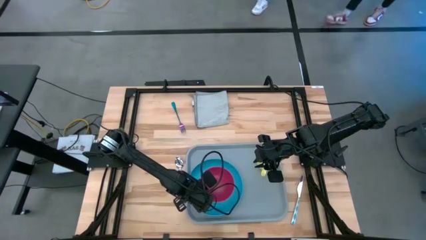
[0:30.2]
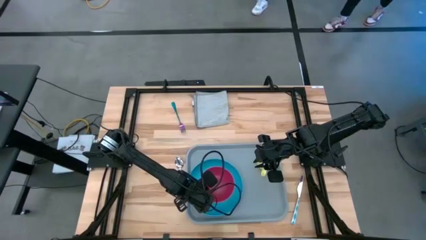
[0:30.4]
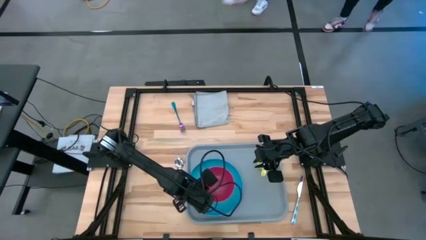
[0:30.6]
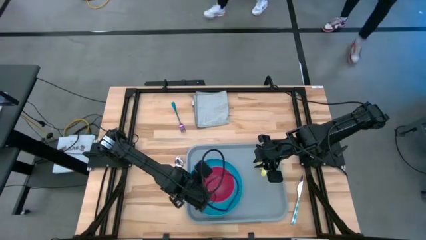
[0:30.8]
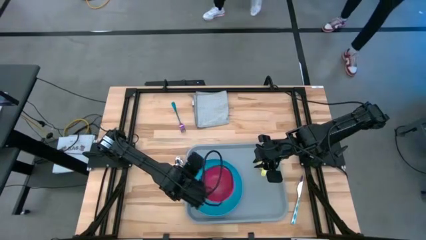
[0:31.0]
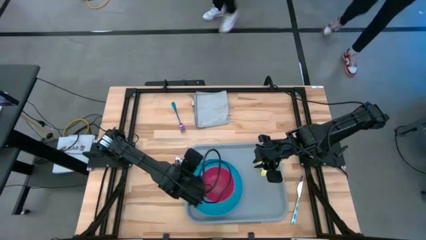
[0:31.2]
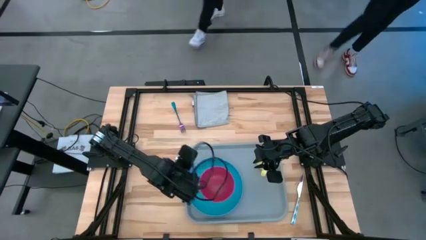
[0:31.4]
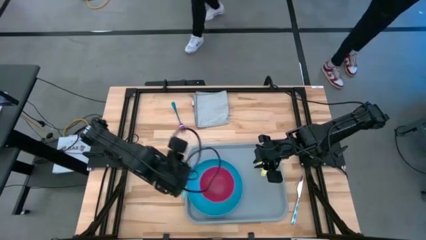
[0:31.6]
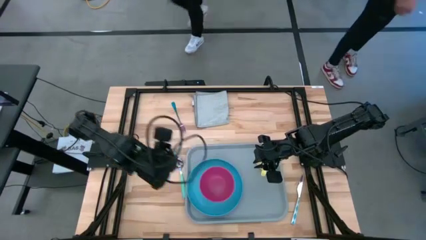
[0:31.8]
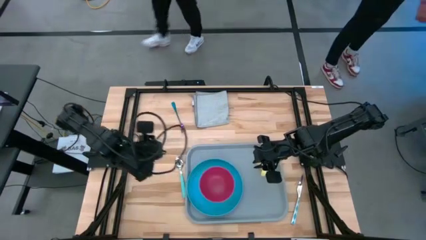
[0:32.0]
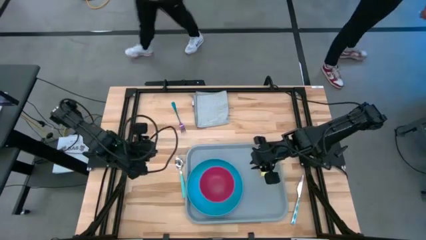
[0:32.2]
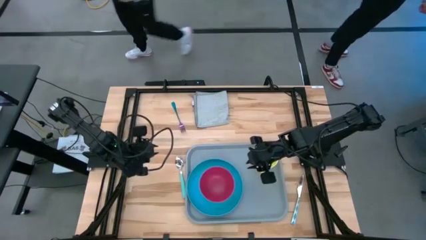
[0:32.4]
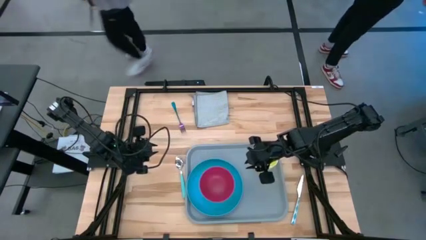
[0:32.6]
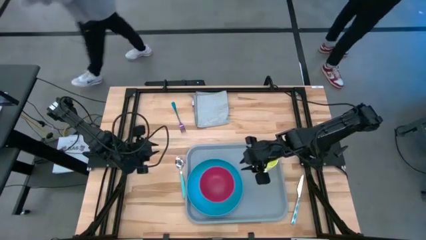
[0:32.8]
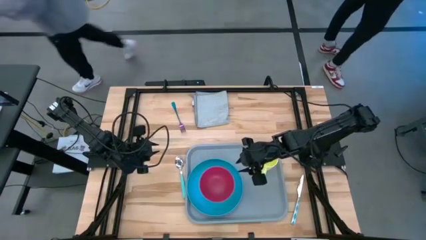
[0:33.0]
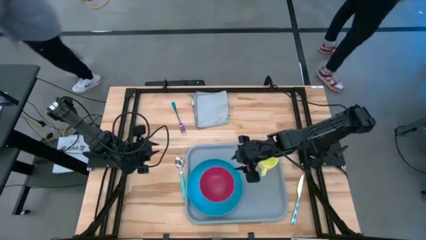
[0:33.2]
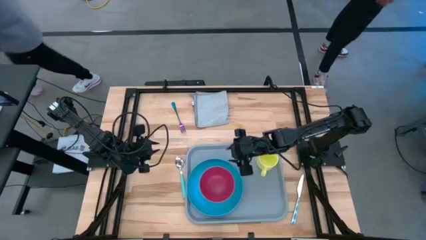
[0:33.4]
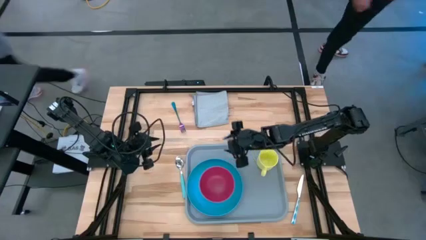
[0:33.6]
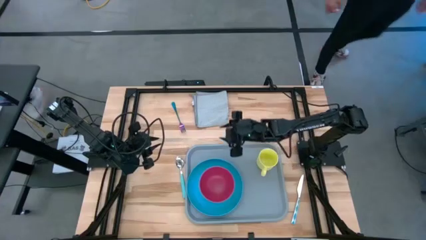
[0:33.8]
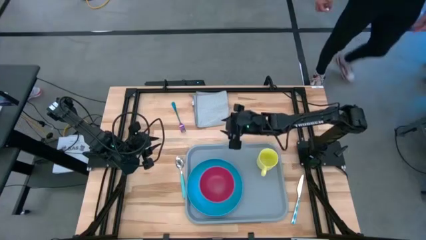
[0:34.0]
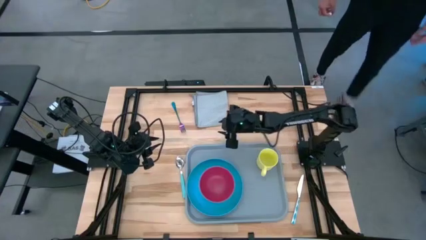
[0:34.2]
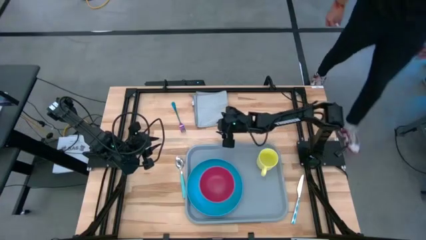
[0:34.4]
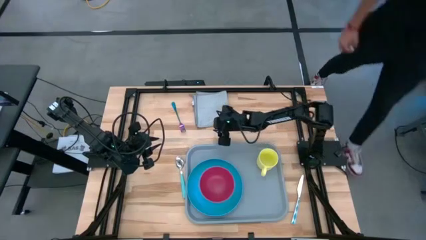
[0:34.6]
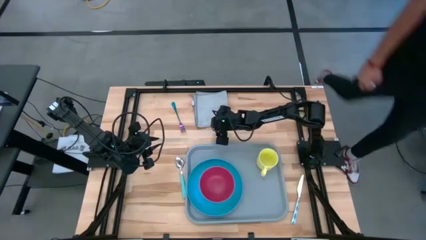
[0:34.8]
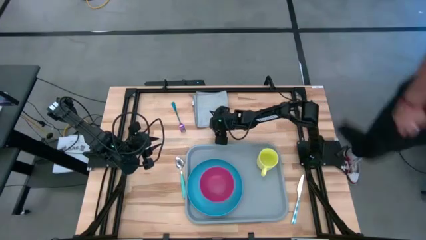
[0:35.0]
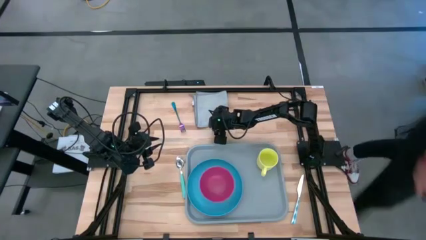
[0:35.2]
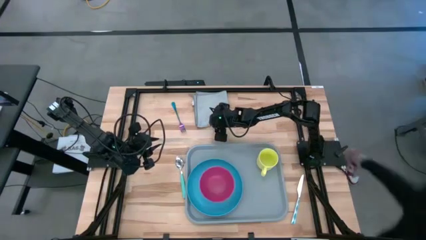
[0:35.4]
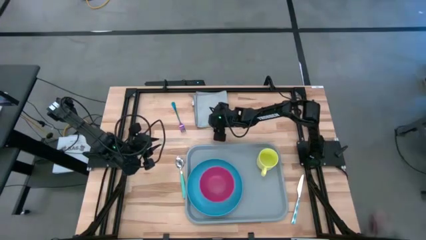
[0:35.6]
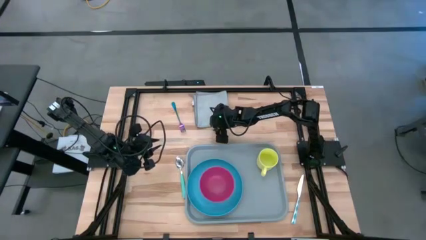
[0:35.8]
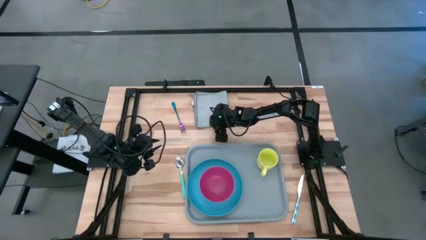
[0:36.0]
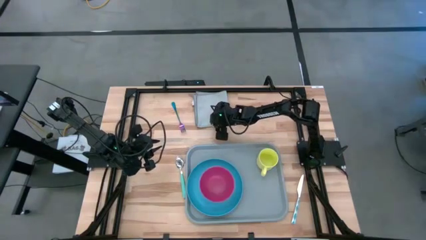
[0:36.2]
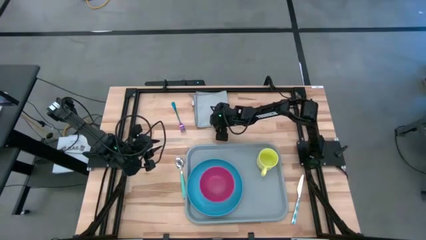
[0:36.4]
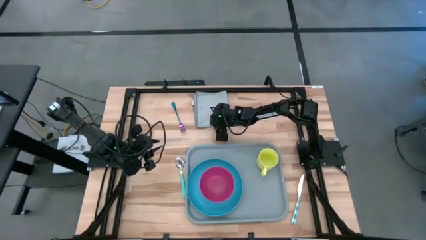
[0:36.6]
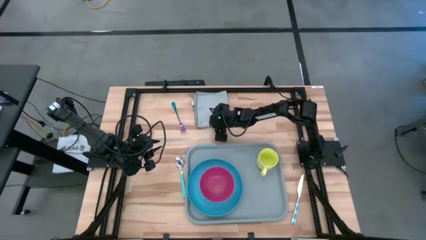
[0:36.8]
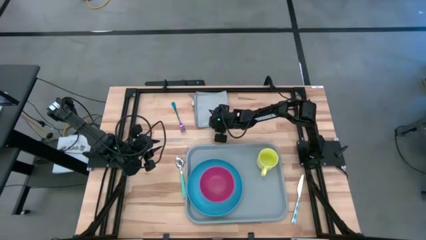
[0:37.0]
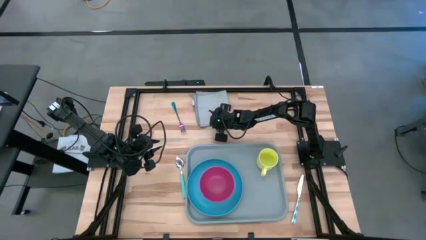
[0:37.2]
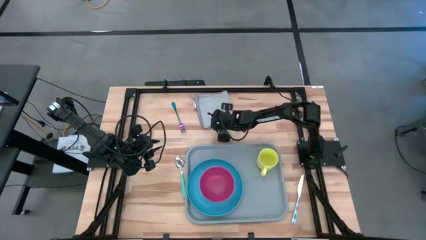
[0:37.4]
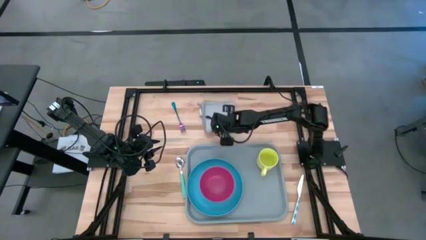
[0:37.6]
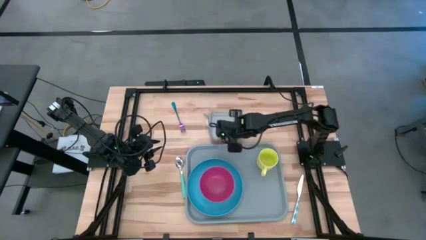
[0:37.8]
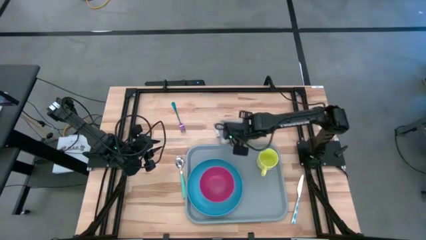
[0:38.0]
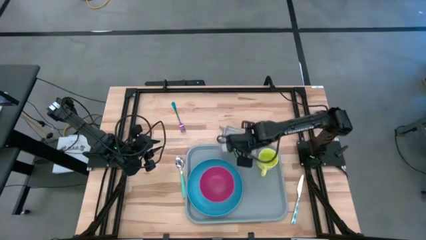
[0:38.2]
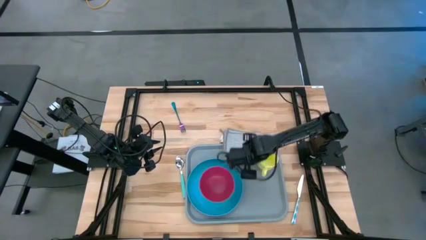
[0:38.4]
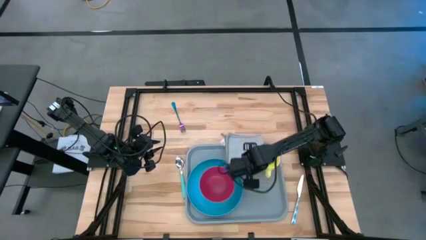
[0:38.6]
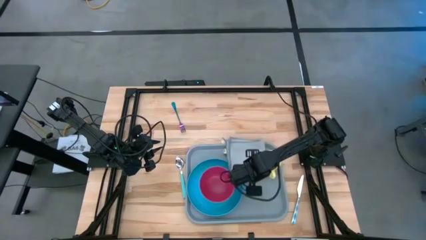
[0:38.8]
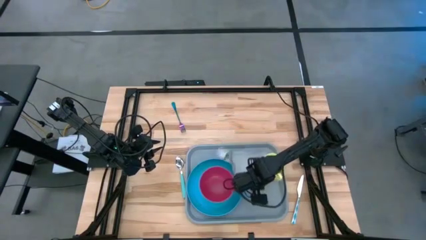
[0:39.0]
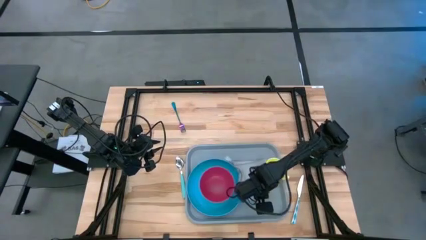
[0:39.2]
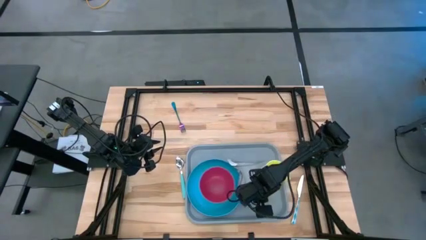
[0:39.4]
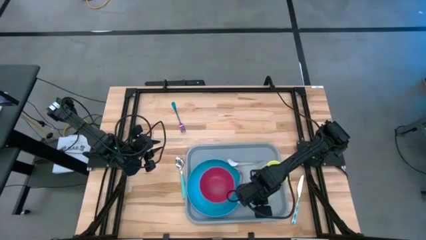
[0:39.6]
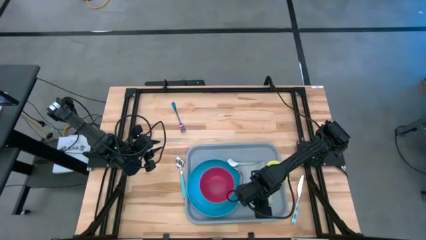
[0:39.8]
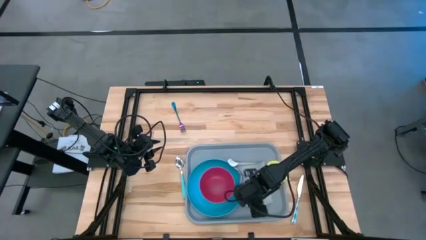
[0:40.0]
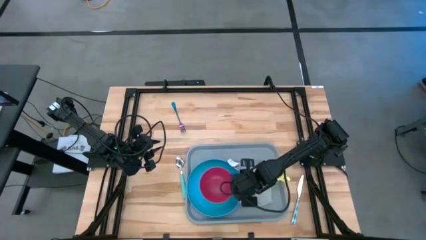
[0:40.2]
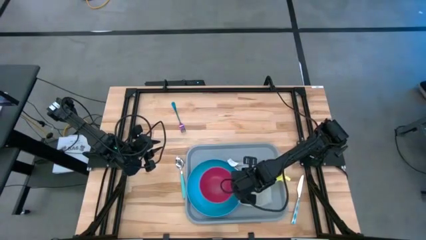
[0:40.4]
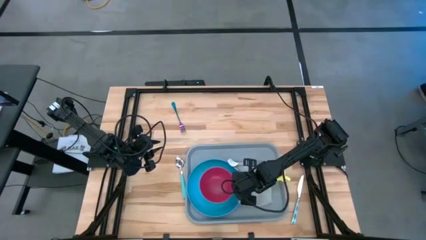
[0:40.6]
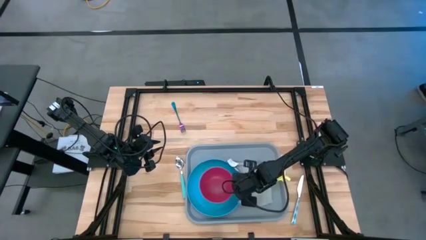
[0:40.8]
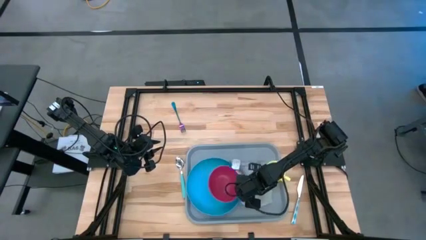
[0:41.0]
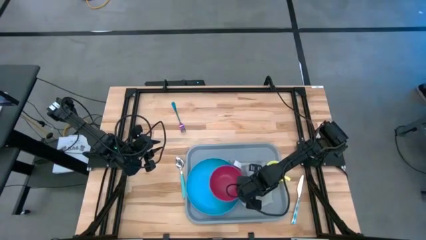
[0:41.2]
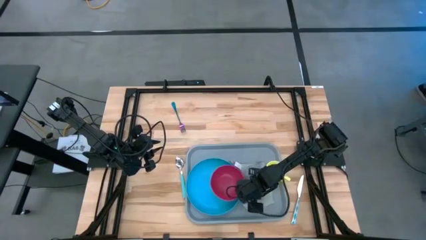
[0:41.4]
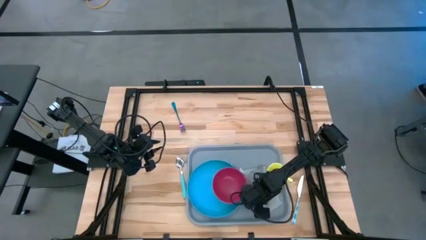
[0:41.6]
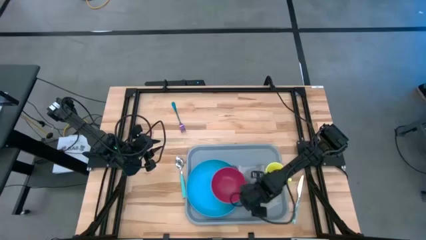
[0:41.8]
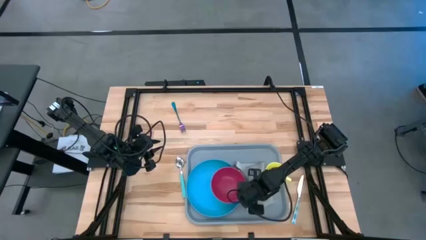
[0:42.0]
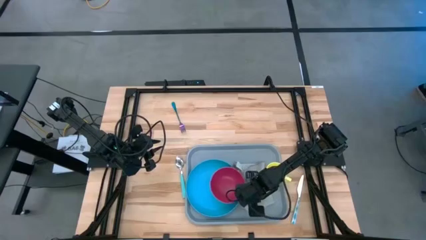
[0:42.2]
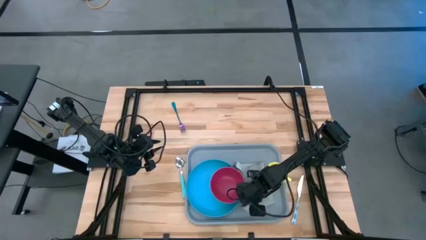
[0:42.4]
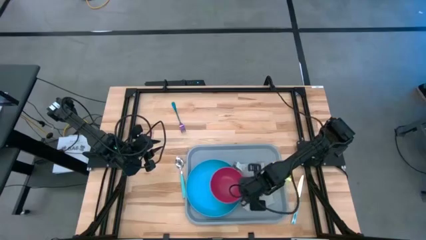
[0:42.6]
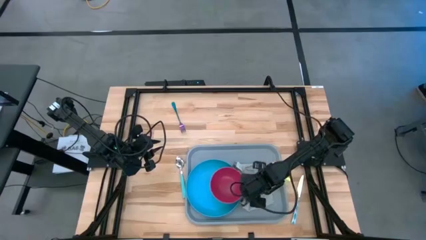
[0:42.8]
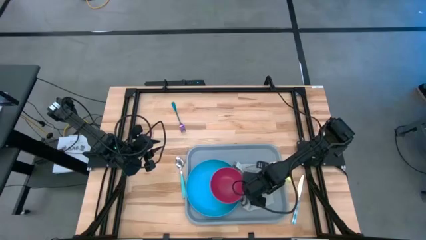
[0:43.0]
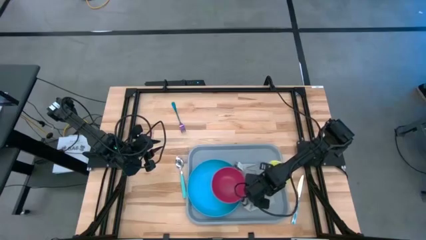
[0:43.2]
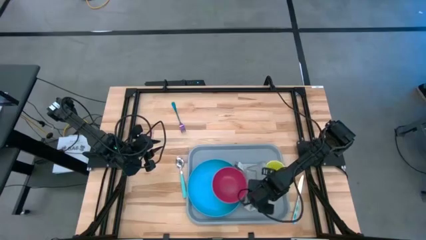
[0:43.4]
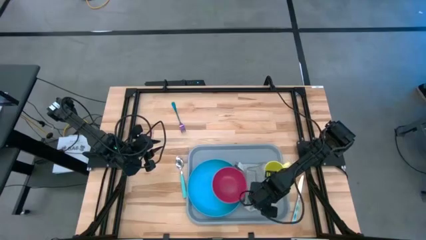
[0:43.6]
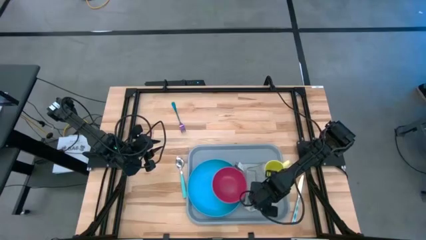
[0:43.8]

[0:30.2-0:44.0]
Task: Set up tray
Put the gray table napkin to the right of the blue plate on the gray tray

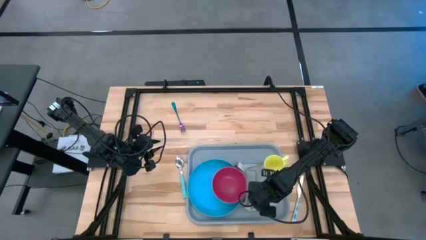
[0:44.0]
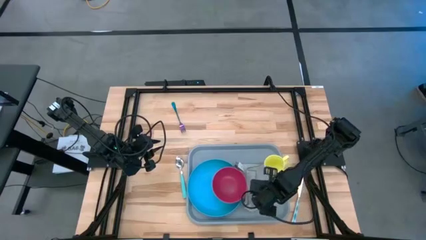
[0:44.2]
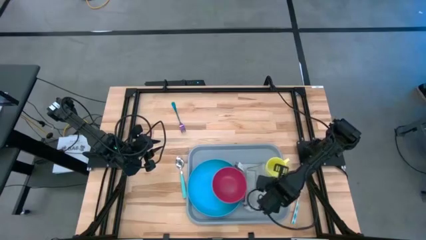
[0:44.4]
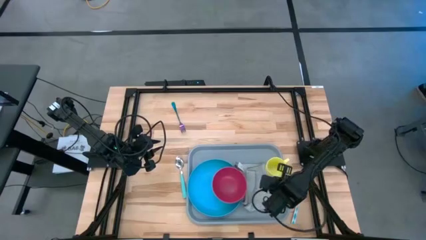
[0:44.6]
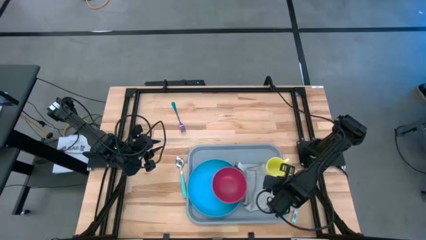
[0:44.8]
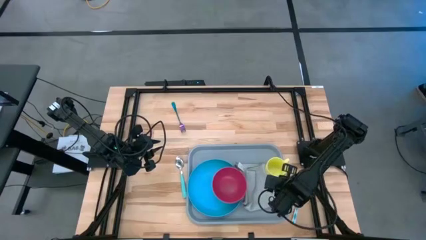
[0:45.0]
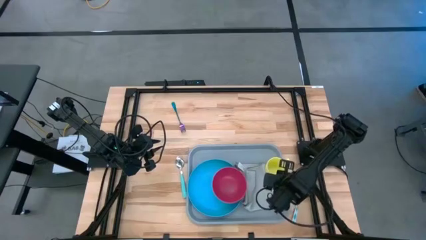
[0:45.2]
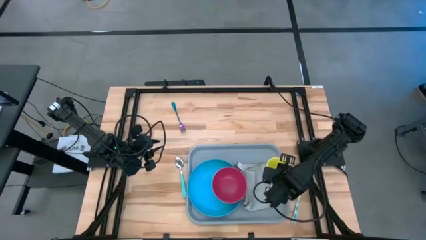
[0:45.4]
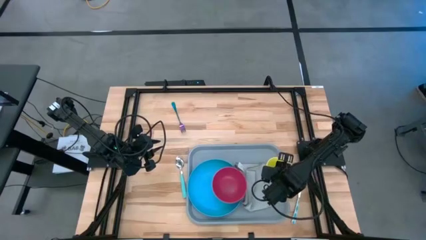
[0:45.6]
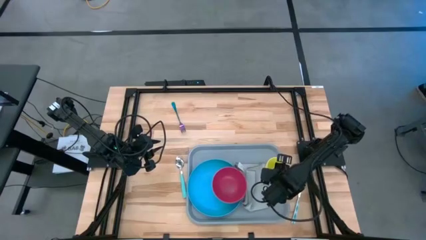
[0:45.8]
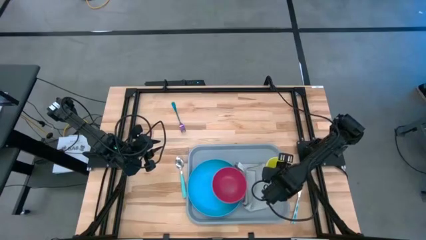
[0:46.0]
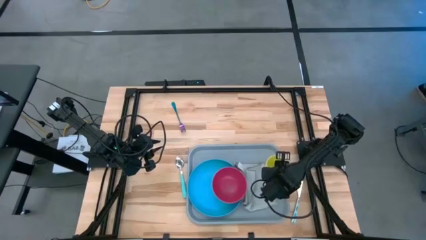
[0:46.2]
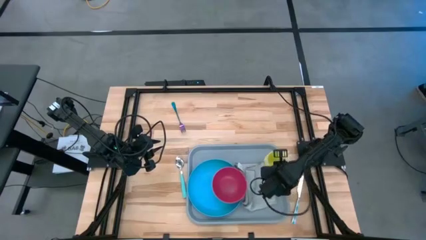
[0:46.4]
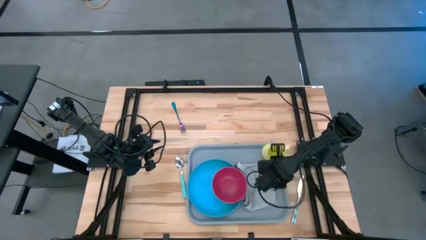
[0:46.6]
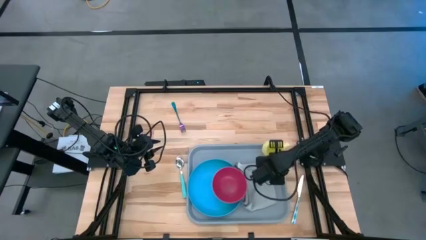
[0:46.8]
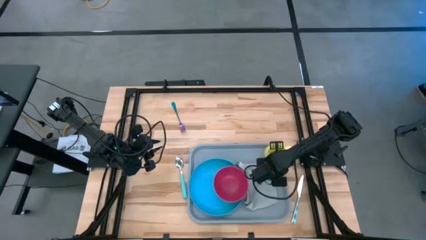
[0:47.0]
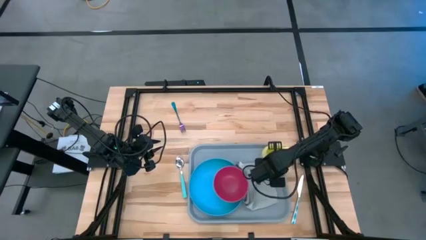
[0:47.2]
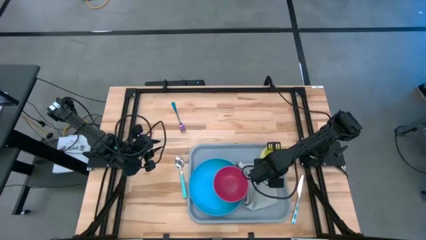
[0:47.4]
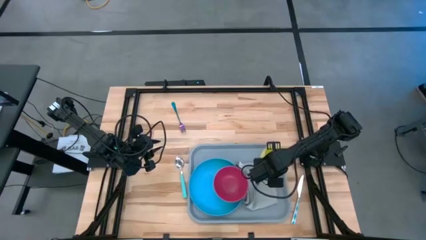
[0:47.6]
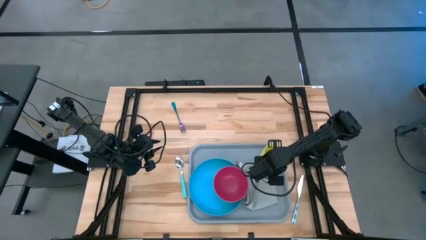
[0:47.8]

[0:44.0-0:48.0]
Adjust the yellow mug
